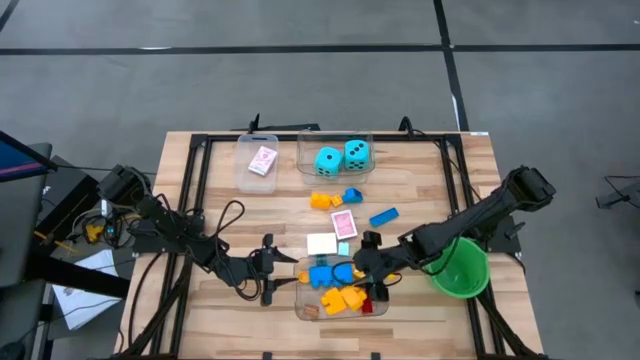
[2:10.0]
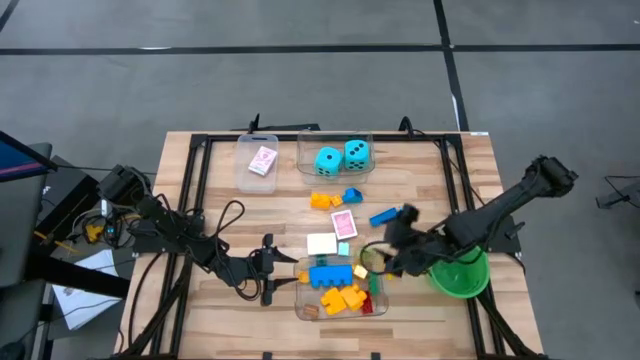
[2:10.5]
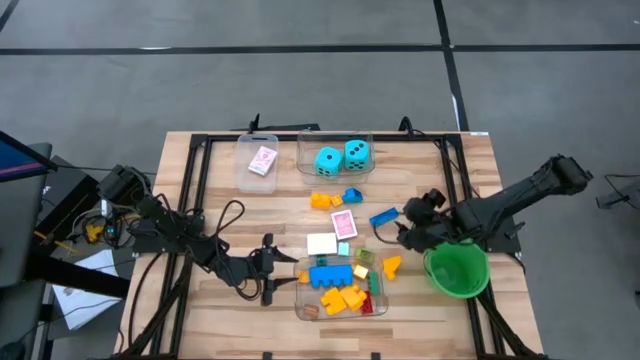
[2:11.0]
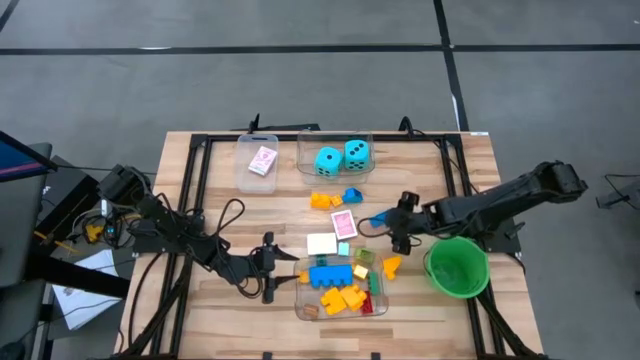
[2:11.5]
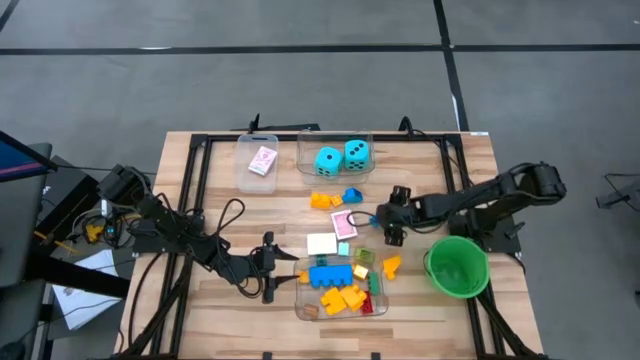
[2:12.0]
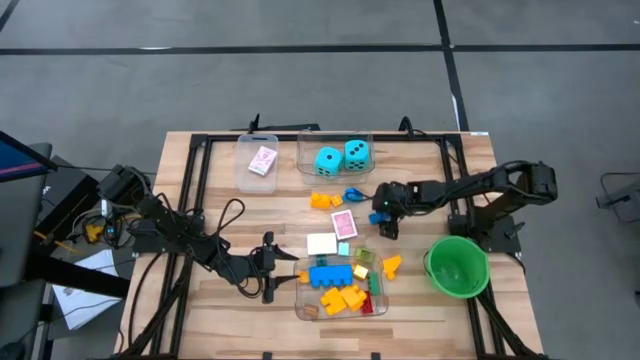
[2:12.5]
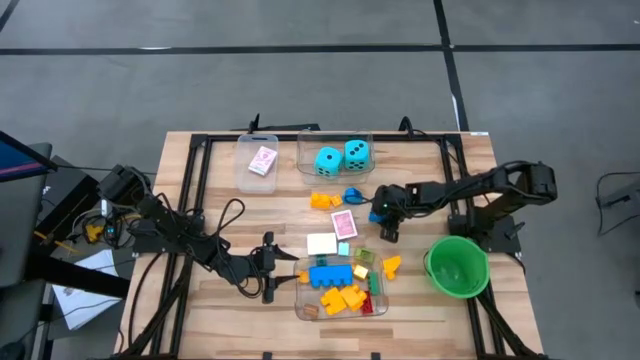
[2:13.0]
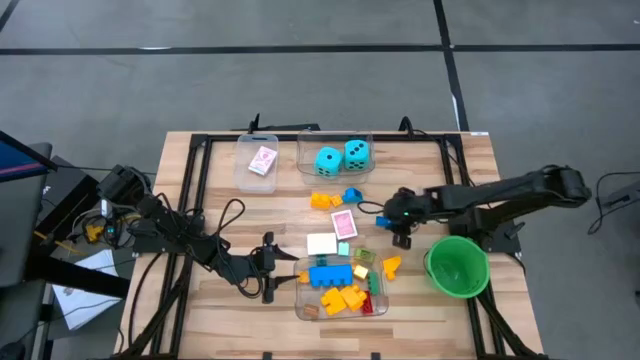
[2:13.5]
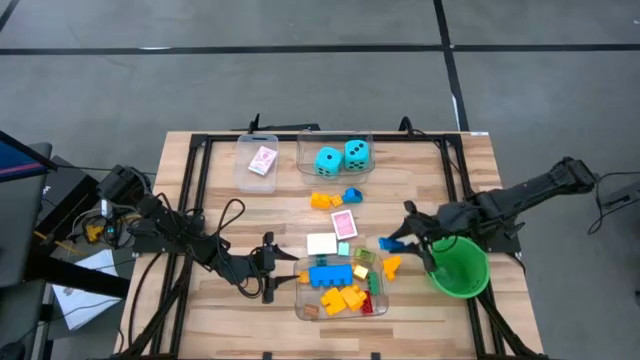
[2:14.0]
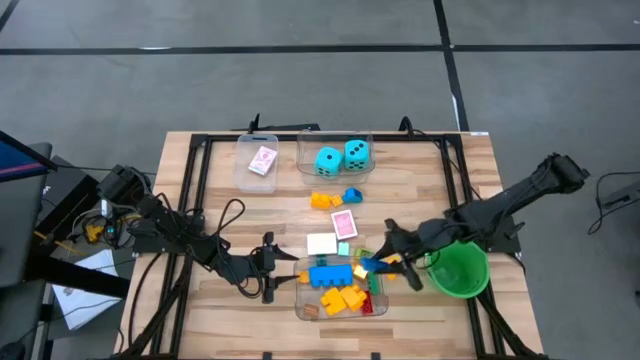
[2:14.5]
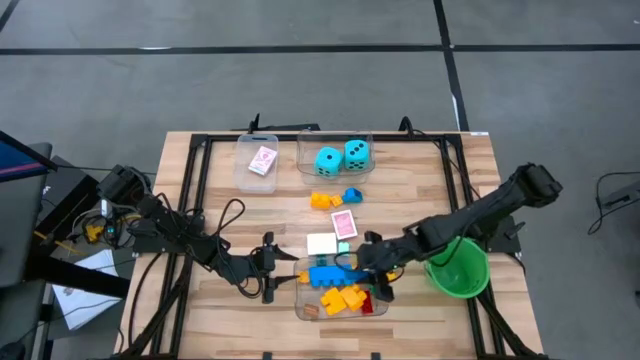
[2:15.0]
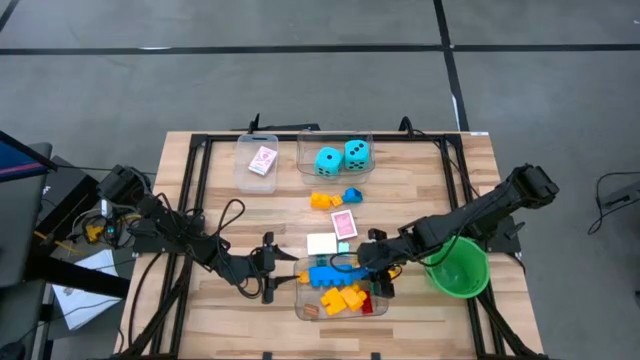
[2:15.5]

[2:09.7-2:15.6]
Task: Pick & Place Toys
Put the blue game piece into the bottom transparent bin

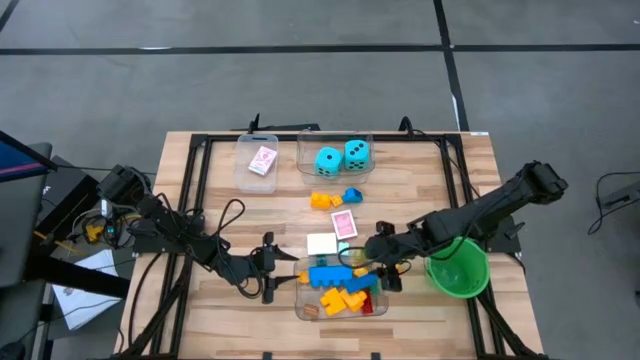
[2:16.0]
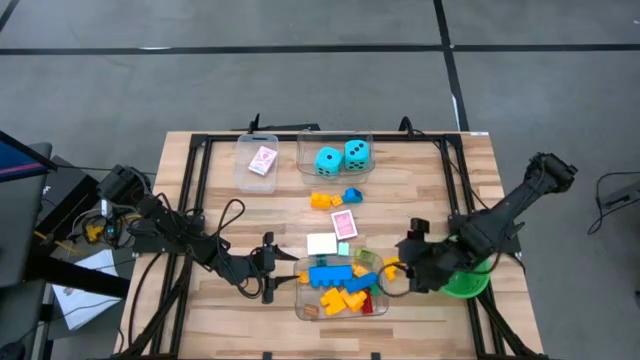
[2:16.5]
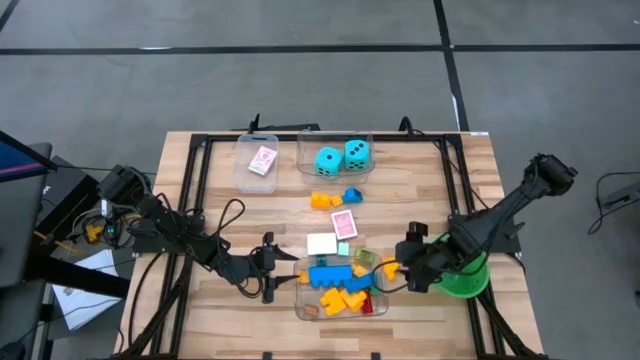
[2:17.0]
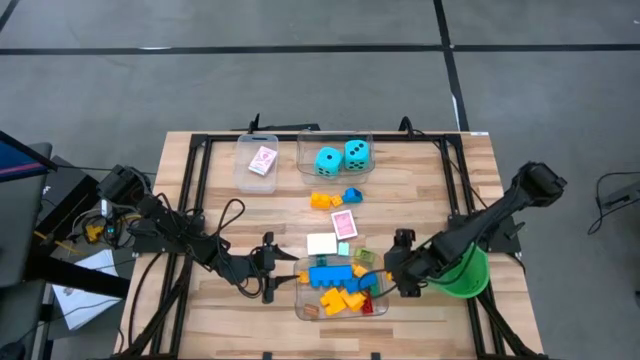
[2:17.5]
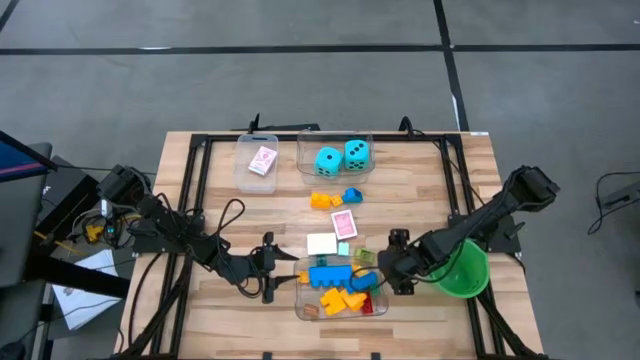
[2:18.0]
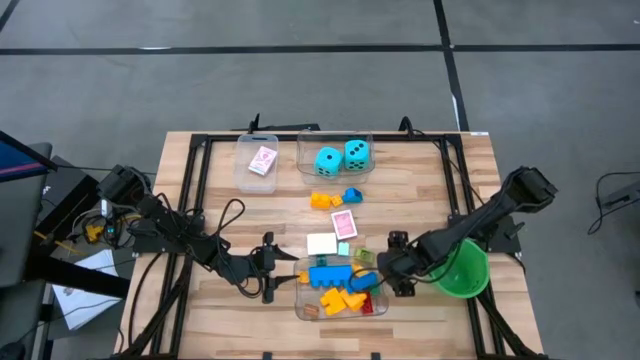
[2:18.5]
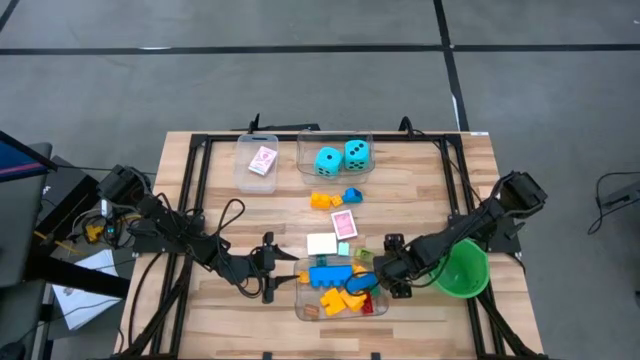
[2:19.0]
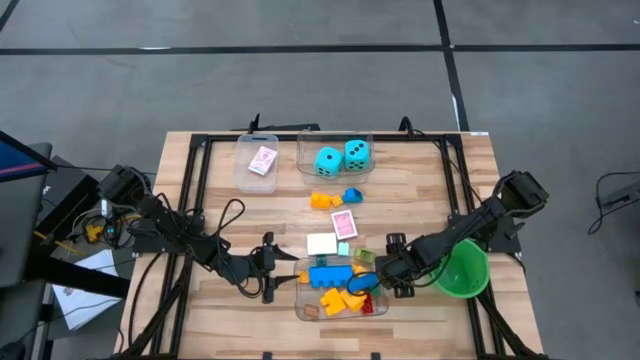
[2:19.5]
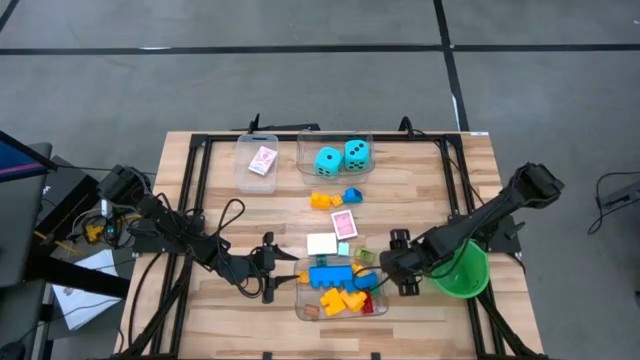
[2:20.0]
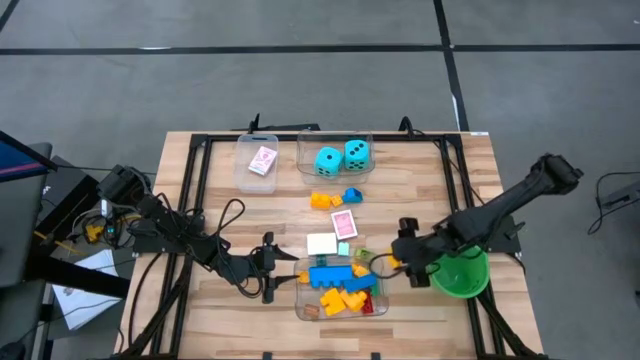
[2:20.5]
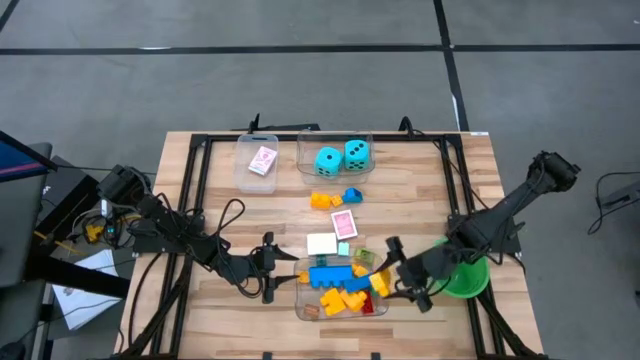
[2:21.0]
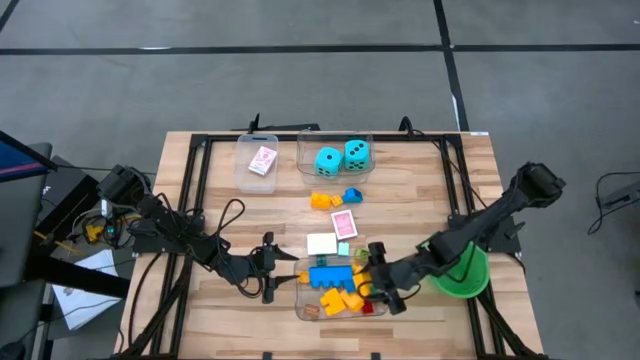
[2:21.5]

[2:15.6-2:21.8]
Put the bottom yellow game piece into the bottom transparent bin

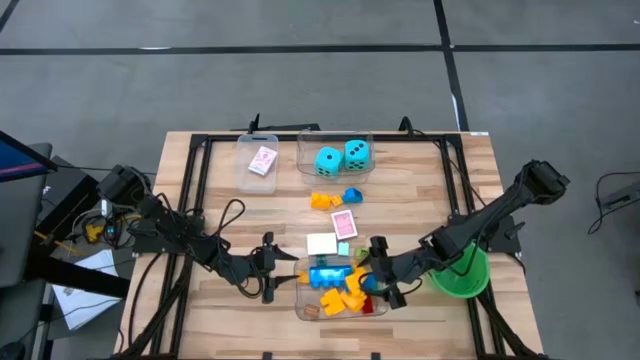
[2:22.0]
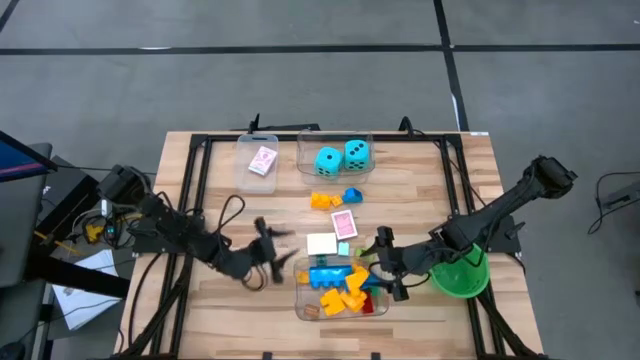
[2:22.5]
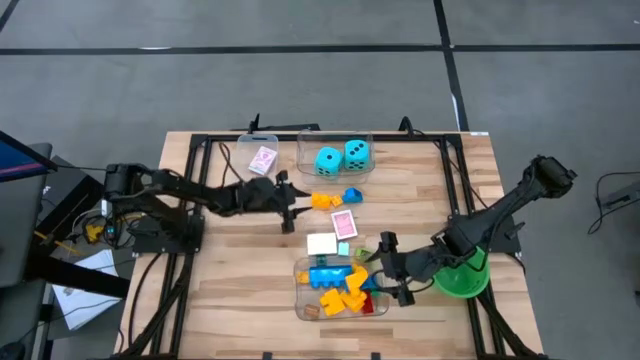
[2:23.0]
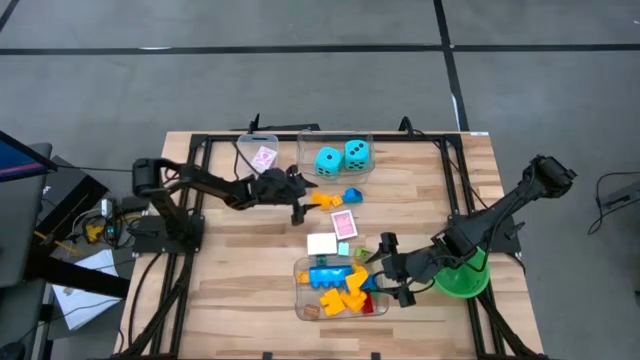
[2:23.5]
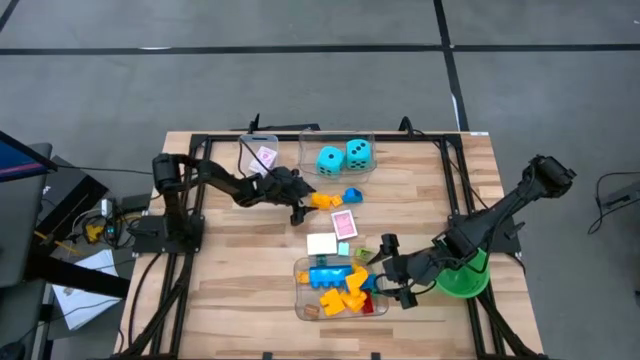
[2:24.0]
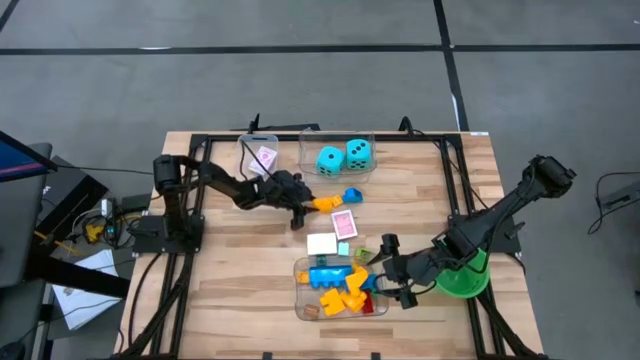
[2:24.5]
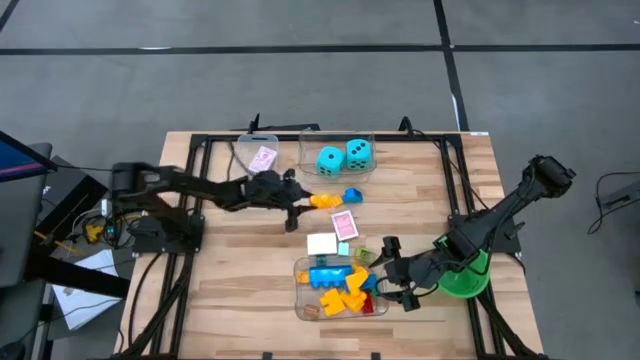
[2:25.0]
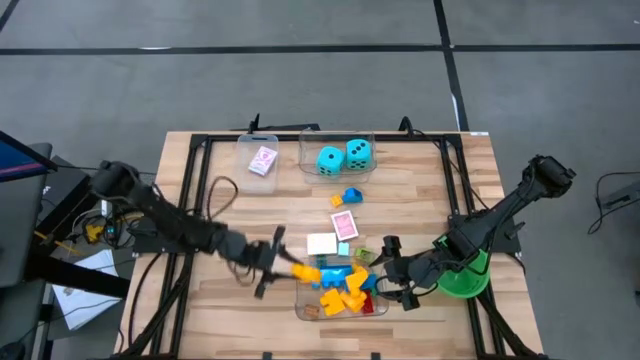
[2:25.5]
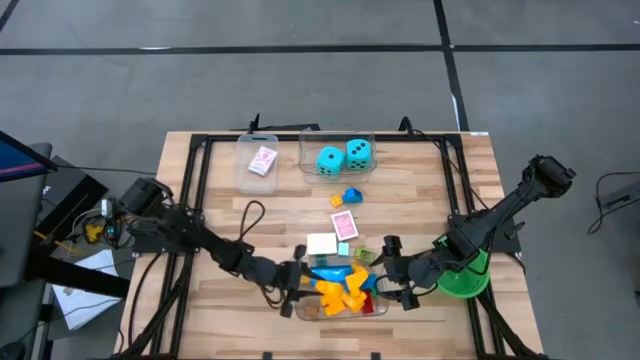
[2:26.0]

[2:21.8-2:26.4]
Put the yellow game piece into the bottom transparent bin

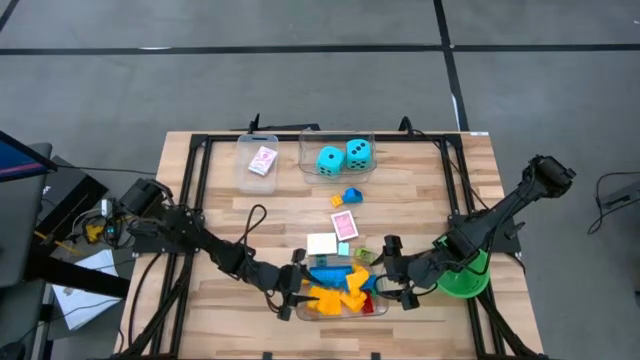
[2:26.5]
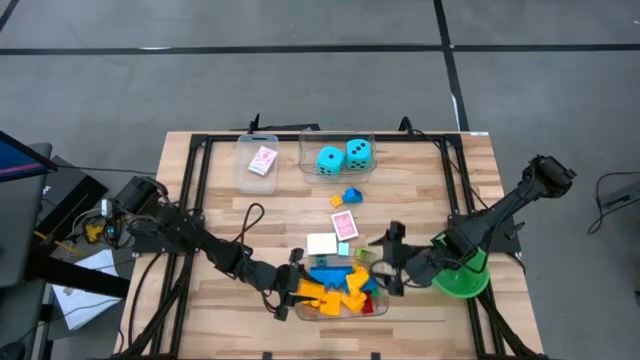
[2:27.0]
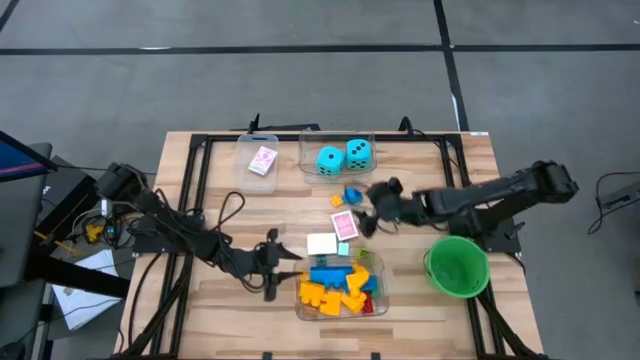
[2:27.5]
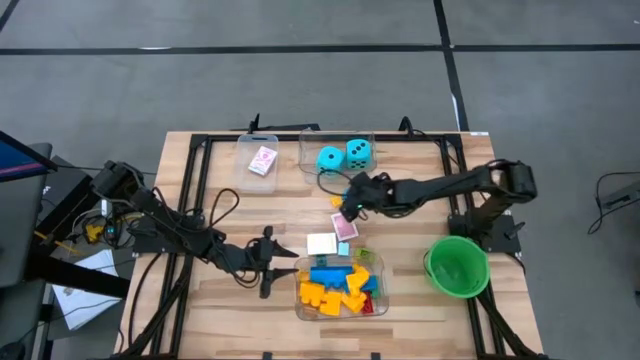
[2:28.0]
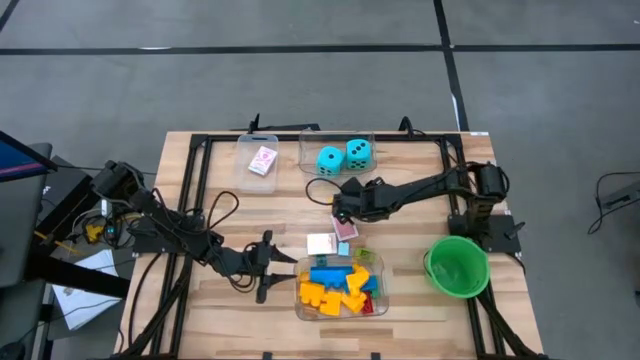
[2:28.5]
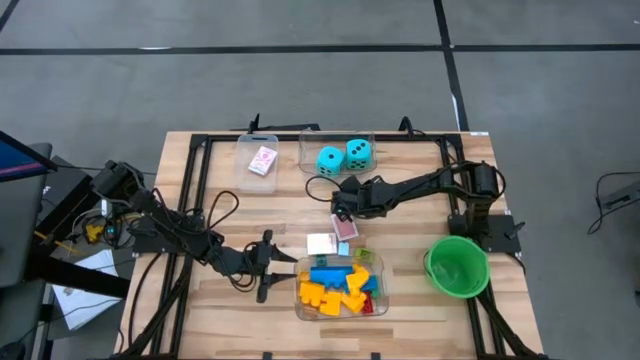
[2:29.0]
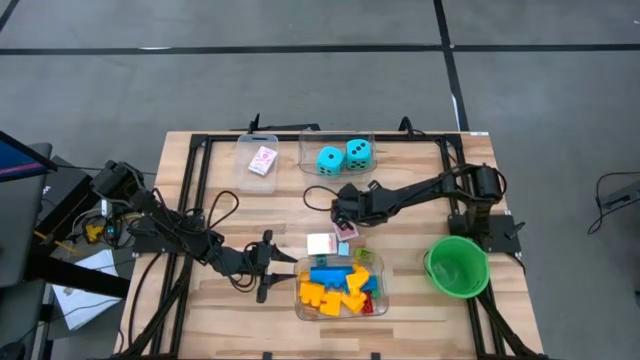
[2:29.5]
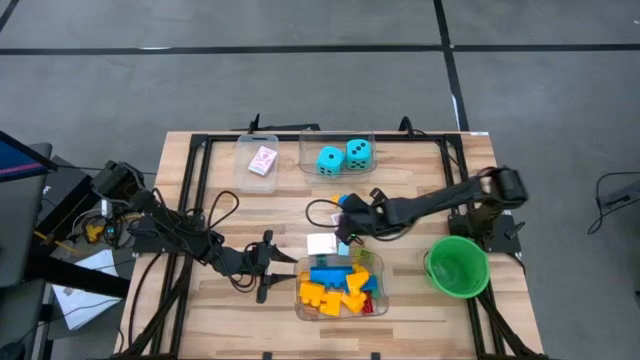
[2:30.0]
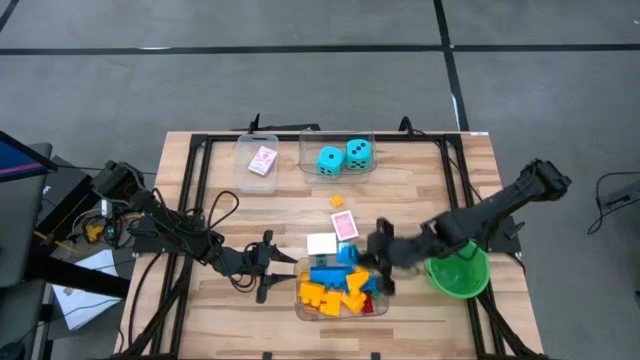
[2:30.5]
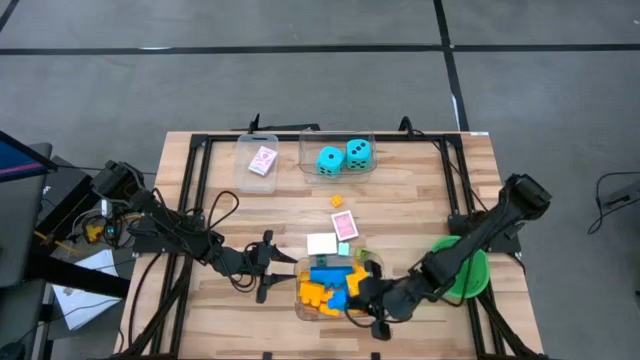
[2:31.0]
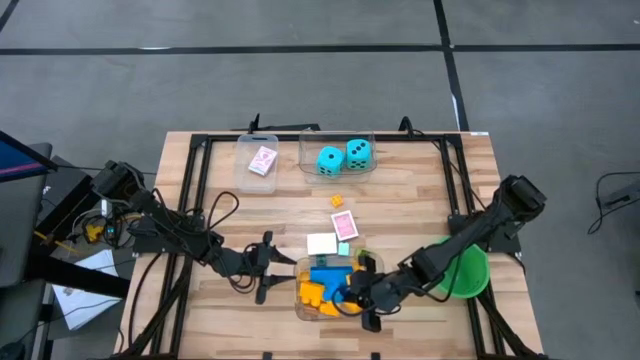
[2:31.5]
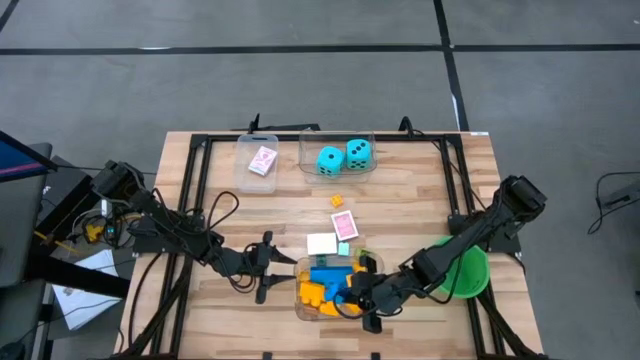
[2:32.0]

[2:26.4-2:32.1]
Put the blue game piece into the bottom transparent bin
